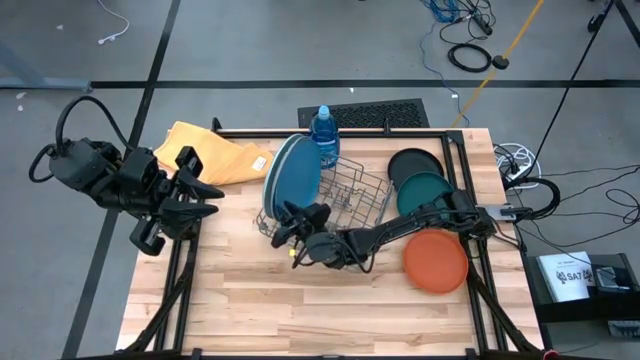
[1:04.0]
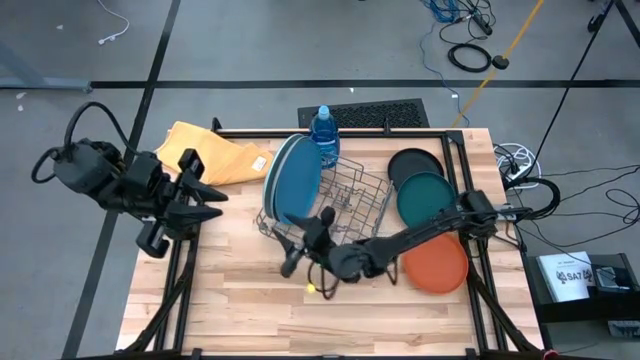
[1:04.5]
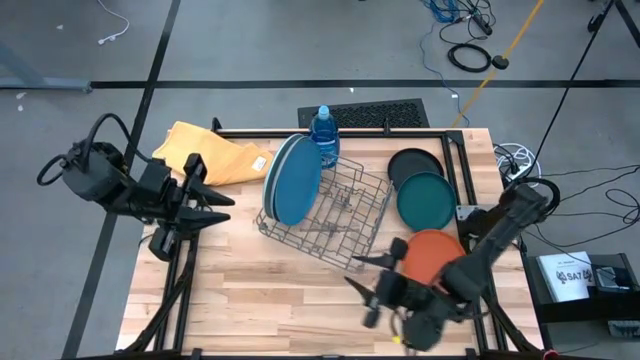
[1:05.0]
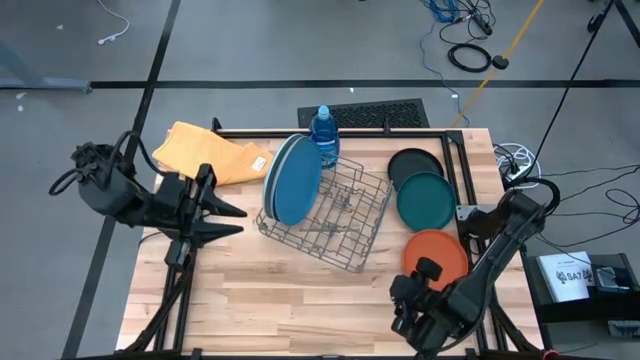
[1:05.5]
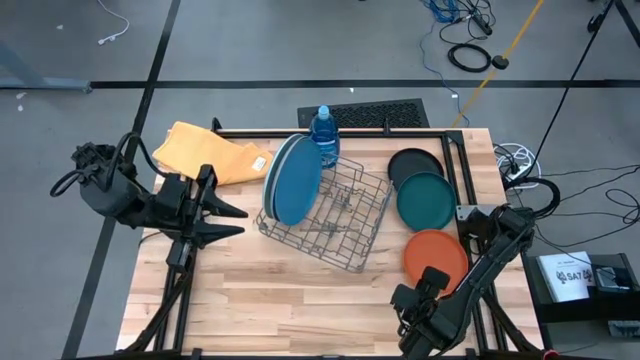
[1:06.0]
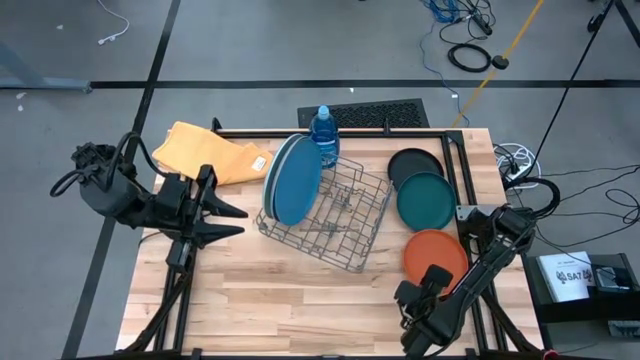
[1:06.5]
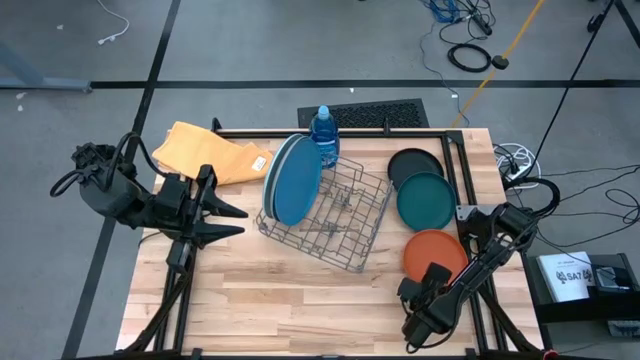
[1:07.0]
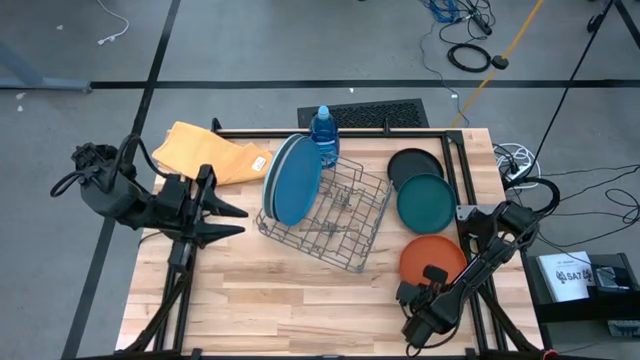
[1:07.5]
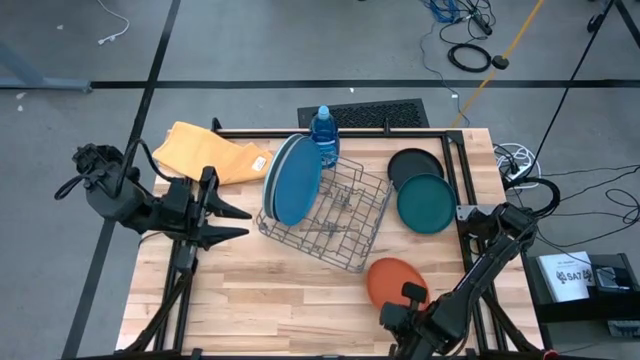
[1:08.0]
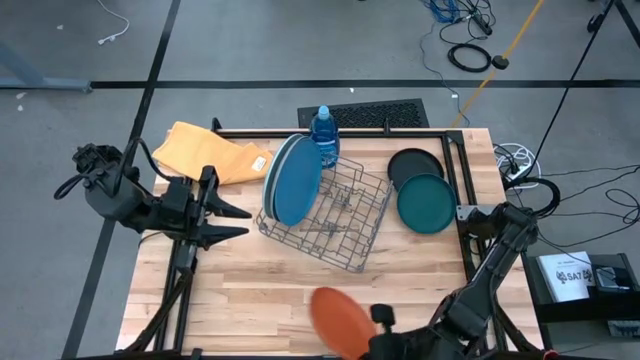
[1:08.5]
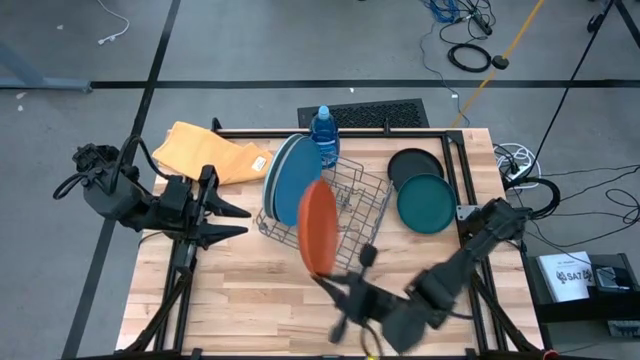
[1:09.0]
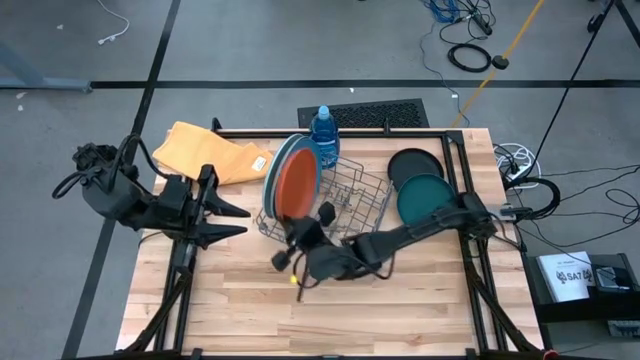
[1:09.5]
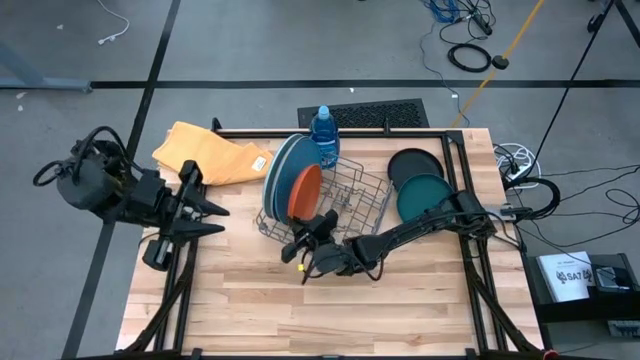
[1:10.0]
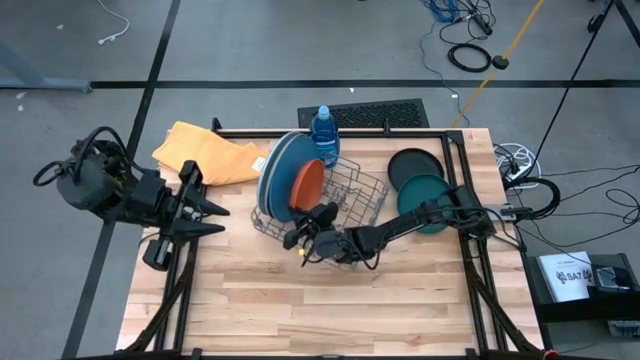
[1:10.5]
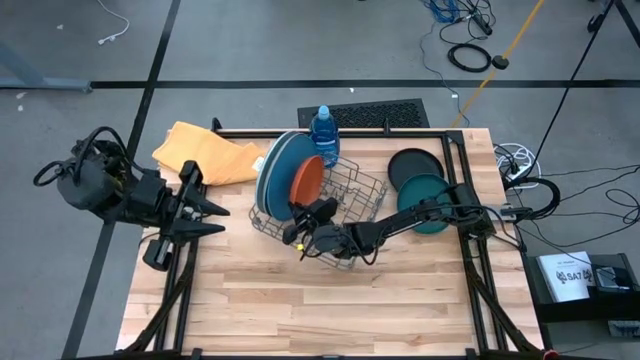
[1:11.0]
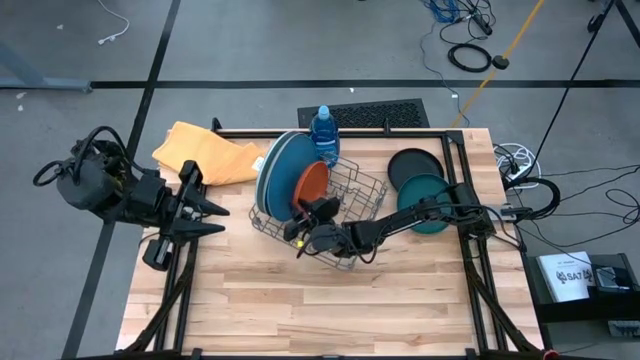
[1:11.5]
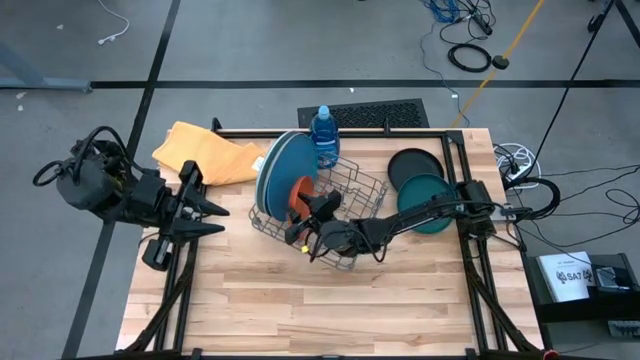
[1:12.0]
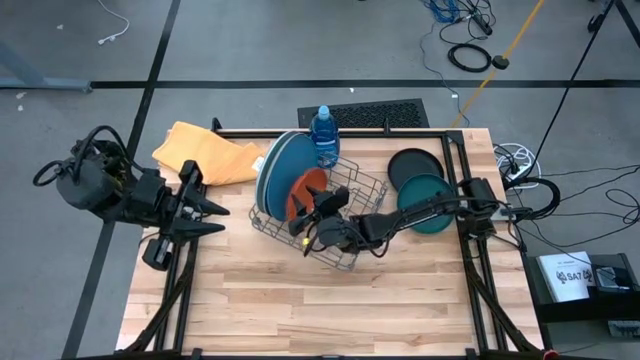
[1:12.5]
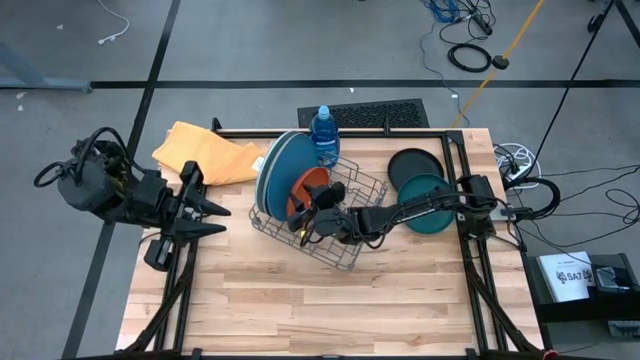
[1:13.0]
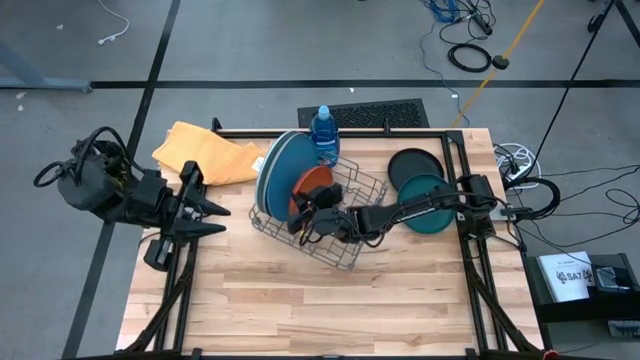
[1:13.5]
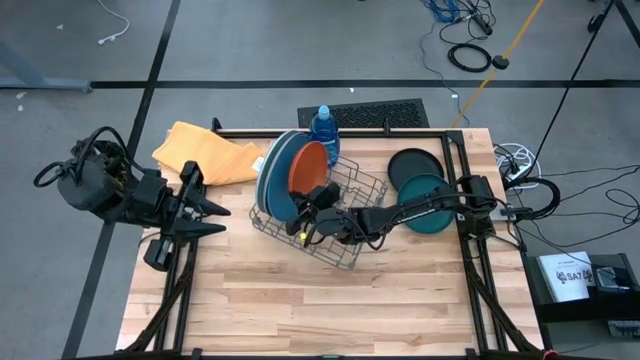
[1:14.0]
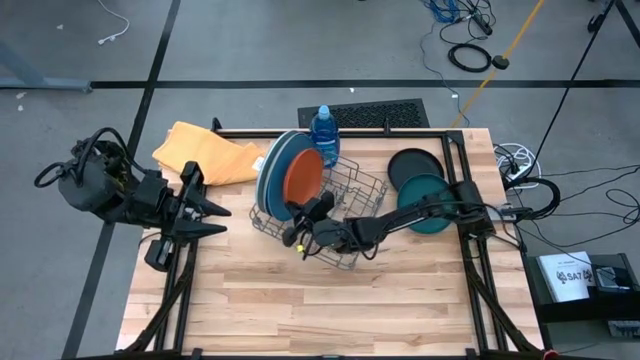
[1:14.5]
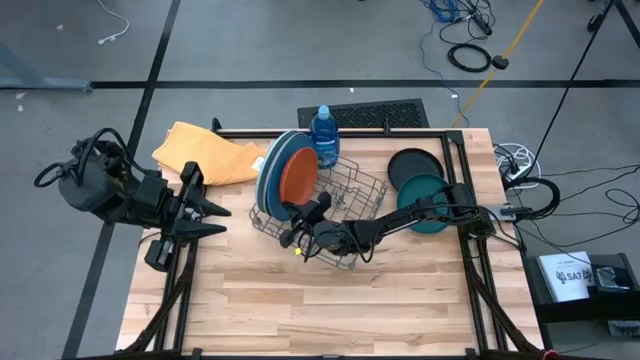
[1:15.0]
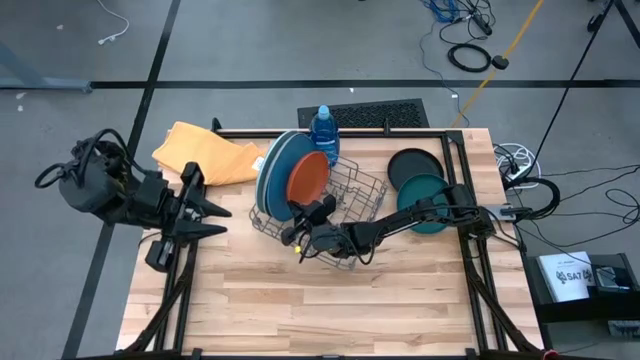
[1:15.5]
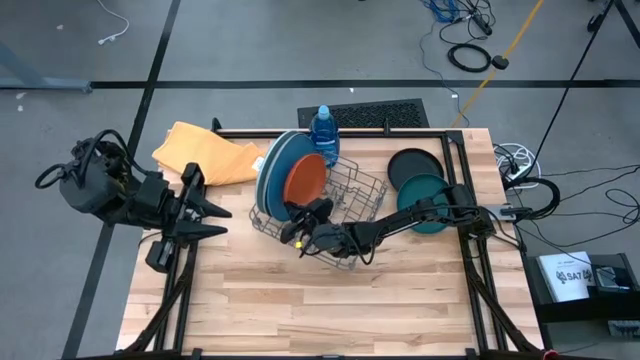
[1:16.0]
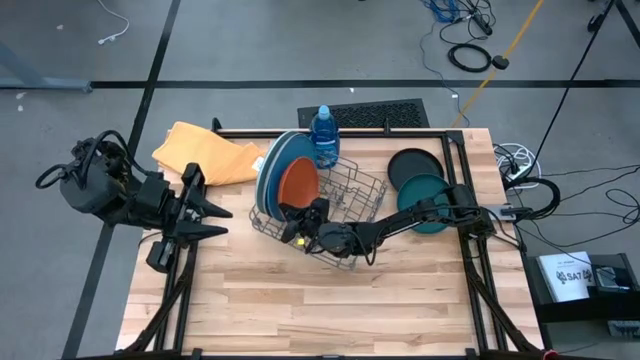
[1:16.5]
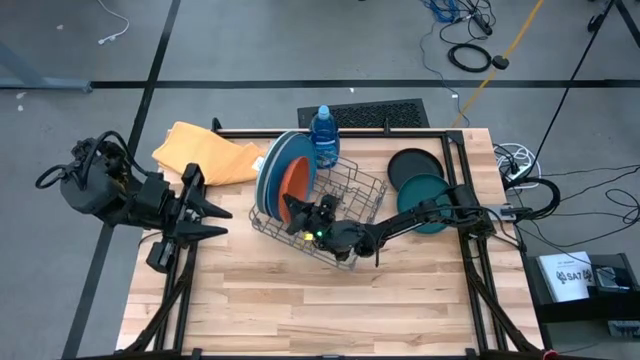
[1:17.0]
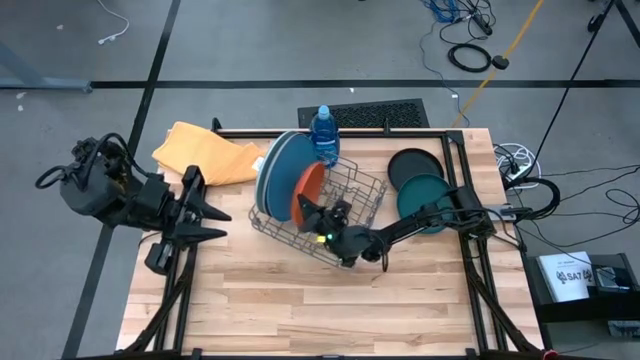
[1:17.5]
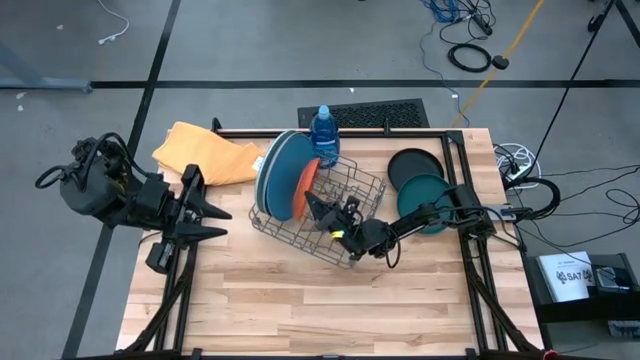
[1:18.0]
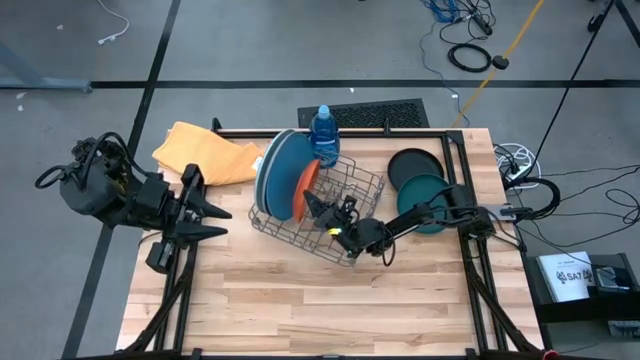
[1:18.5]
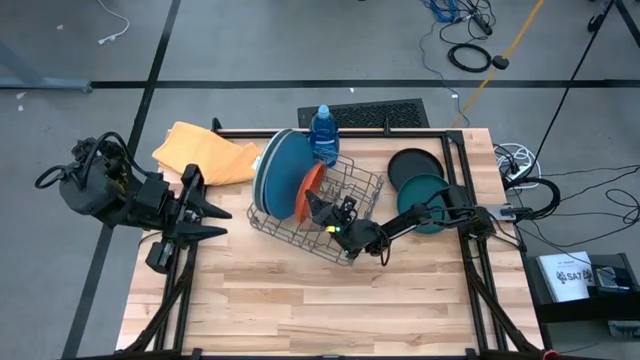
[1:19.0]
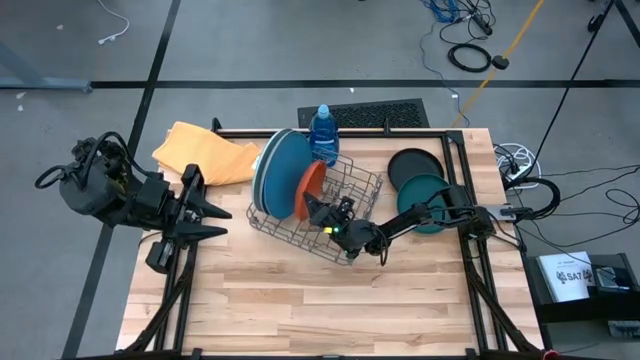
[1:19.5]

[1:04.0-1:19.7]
Task: Sort dishes
Put the orange plate into the dish rack

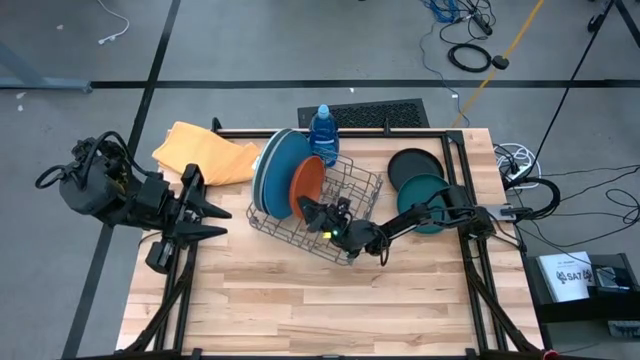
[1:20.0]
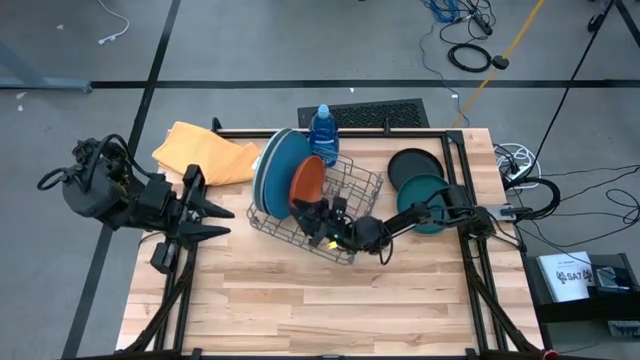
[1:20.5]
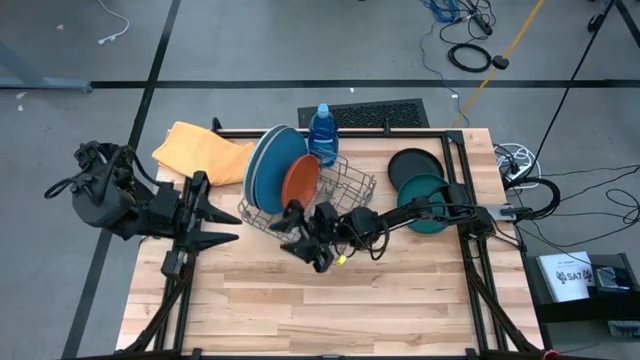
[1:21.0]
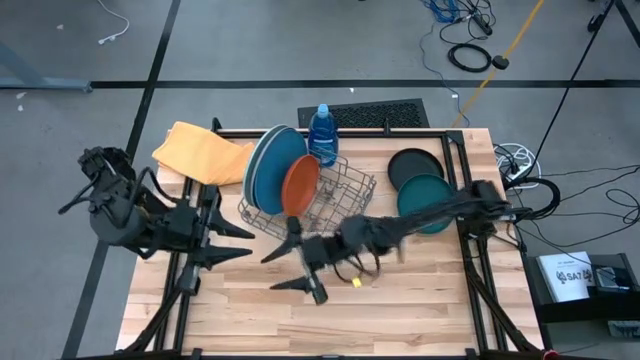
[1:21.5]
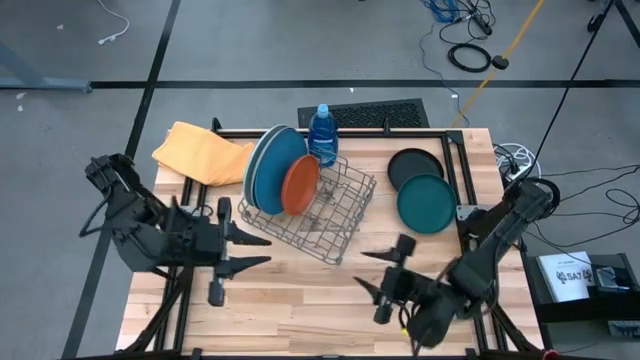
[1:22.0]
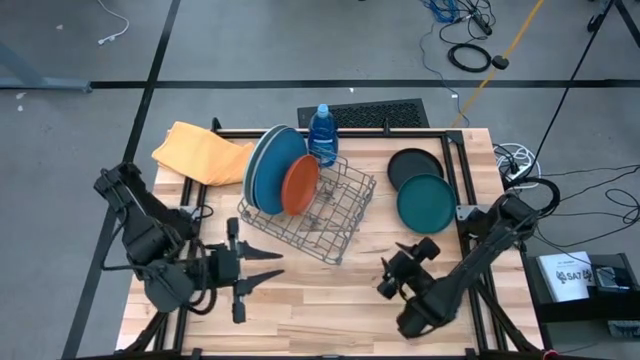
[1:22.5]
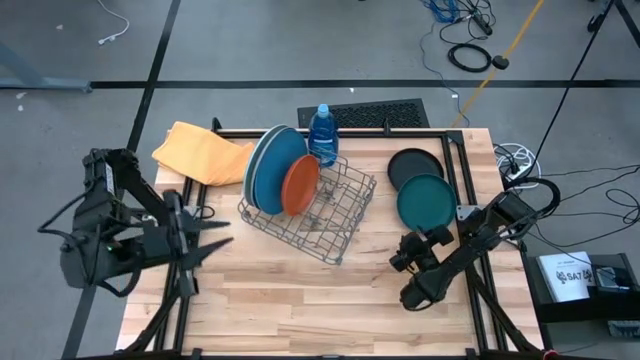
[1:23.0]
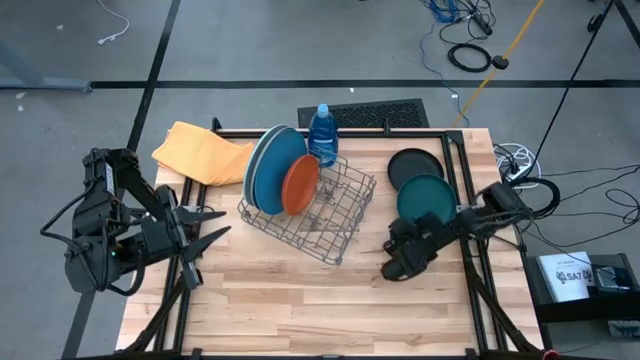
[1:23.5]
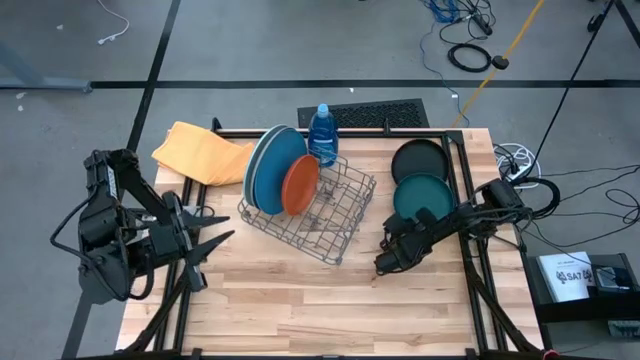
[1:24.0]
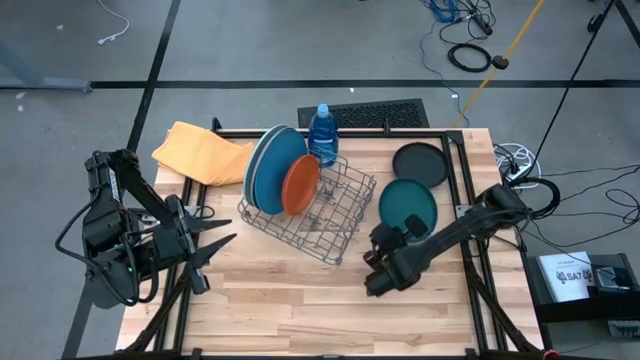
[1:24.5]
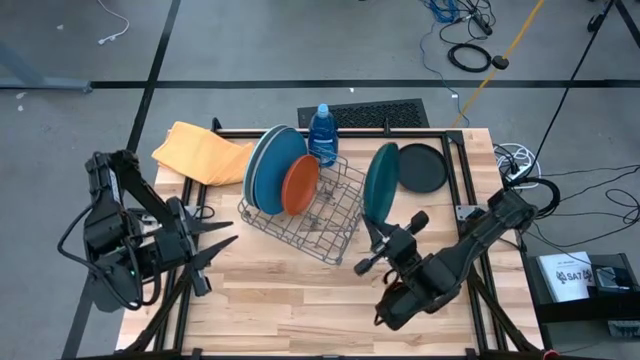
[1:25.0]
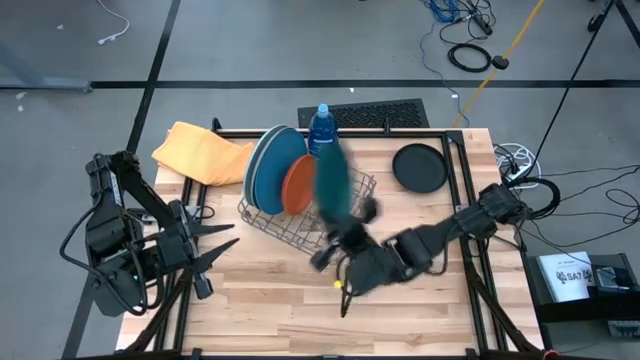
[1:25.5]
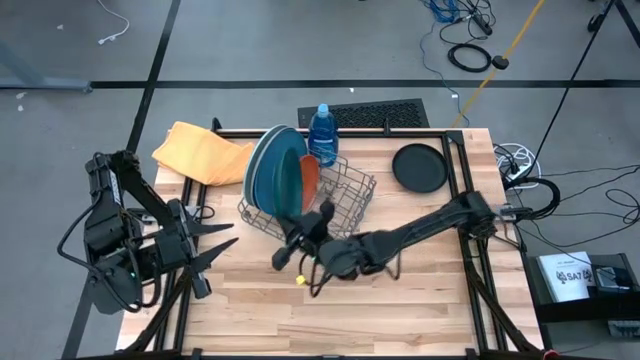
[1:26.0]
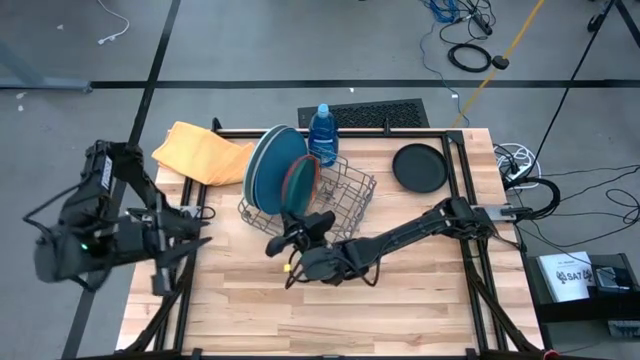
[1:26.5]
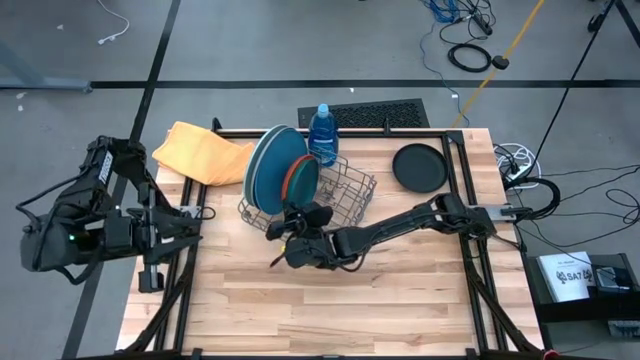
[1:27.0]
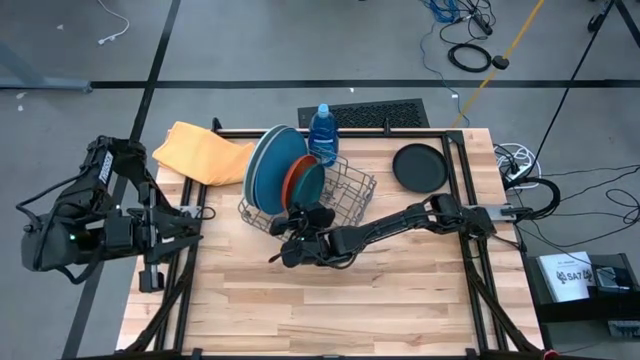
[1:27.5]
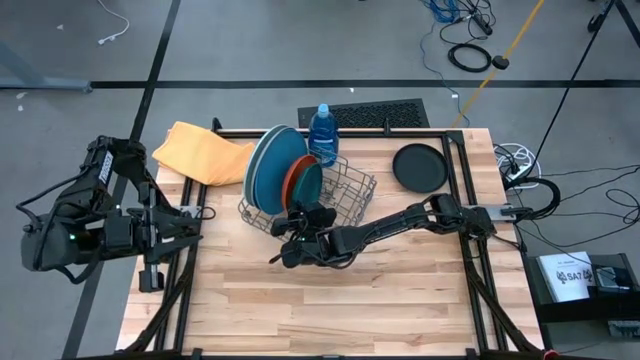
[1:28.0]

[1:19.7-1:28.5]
Put the dark green plate into the dish rack
